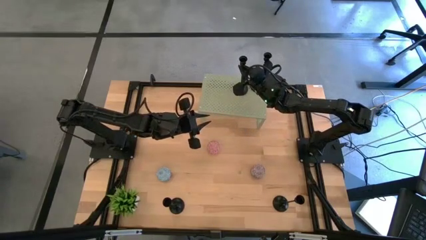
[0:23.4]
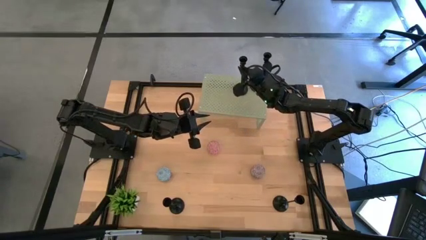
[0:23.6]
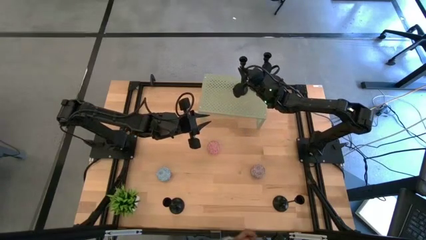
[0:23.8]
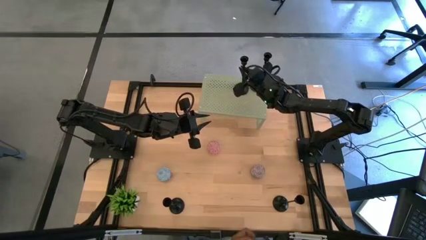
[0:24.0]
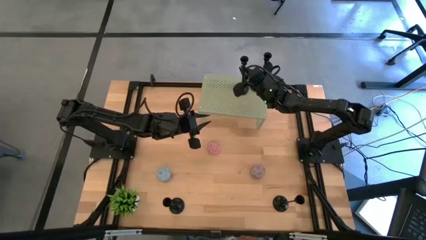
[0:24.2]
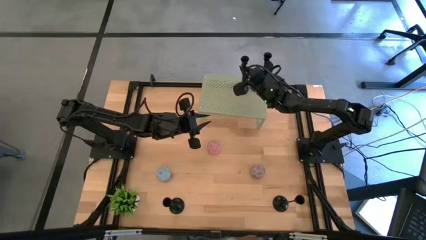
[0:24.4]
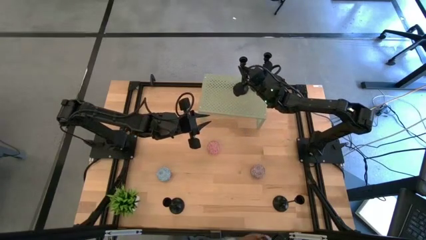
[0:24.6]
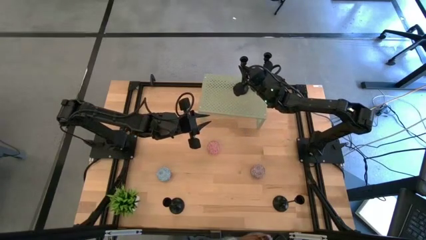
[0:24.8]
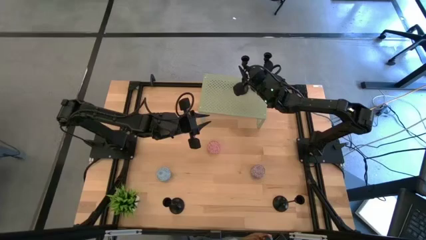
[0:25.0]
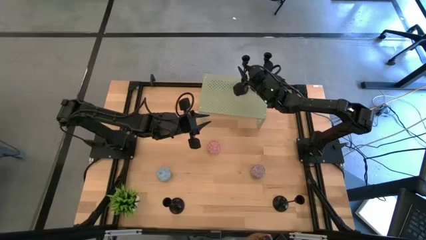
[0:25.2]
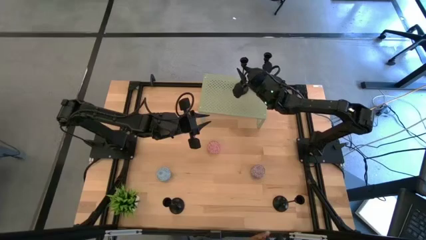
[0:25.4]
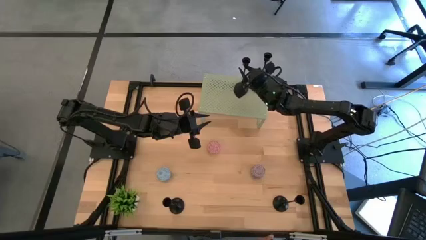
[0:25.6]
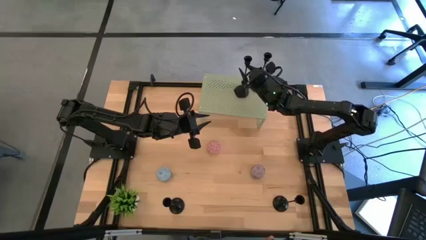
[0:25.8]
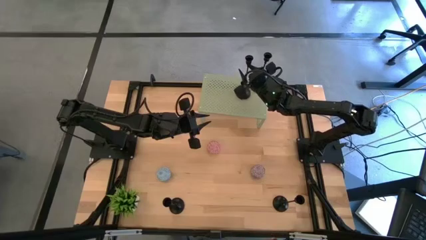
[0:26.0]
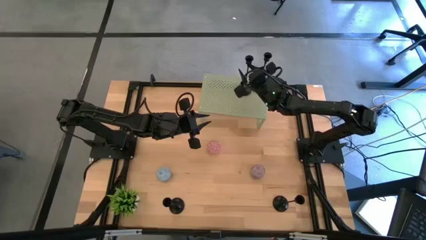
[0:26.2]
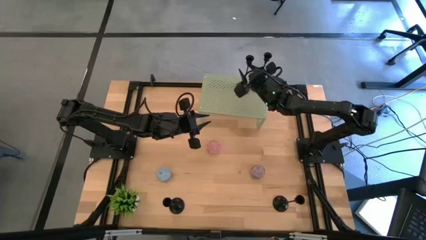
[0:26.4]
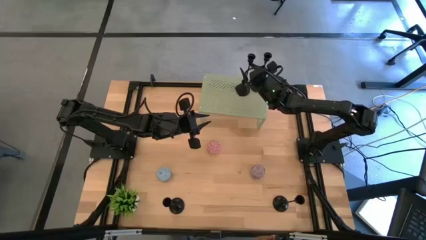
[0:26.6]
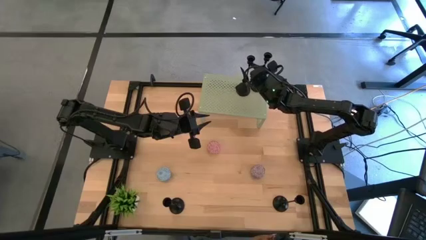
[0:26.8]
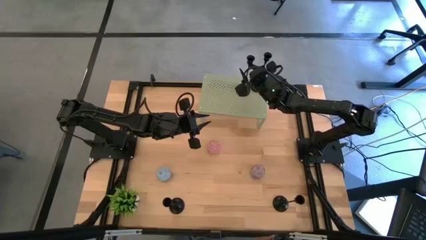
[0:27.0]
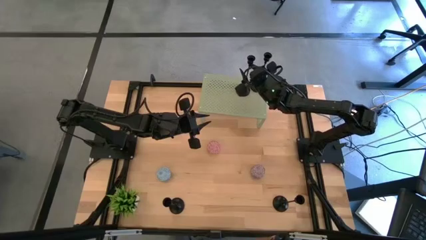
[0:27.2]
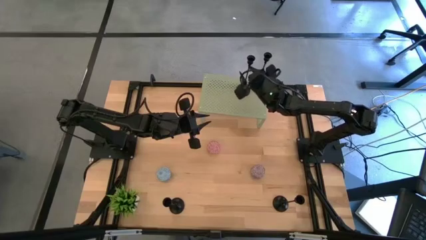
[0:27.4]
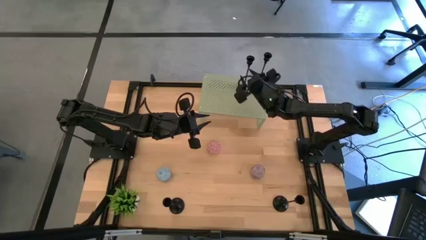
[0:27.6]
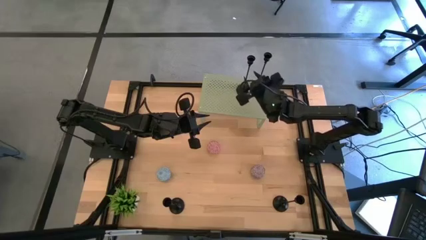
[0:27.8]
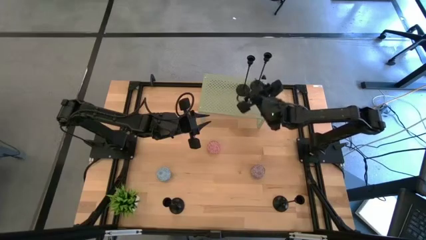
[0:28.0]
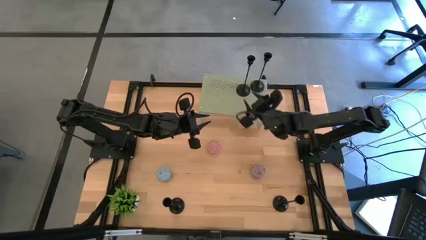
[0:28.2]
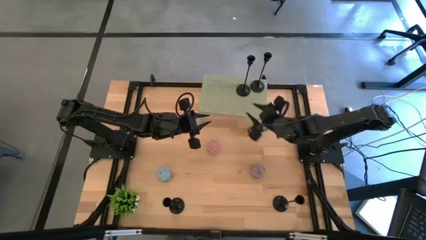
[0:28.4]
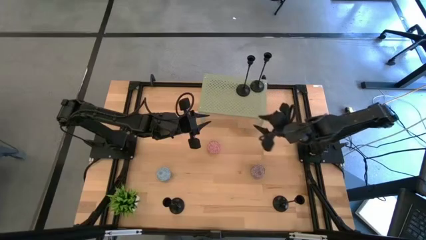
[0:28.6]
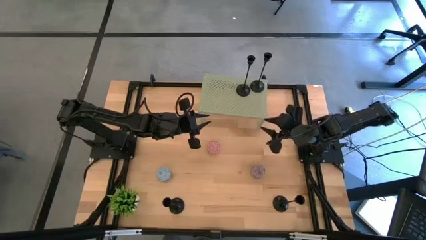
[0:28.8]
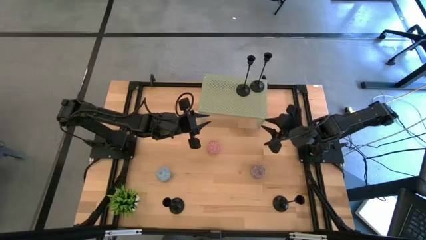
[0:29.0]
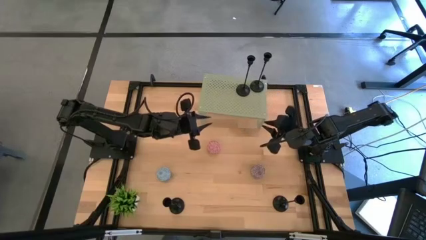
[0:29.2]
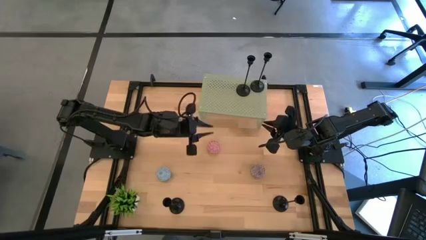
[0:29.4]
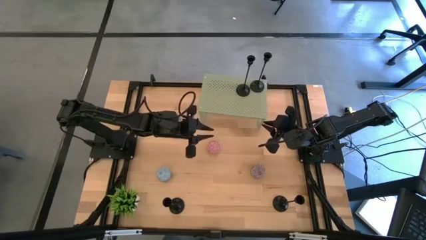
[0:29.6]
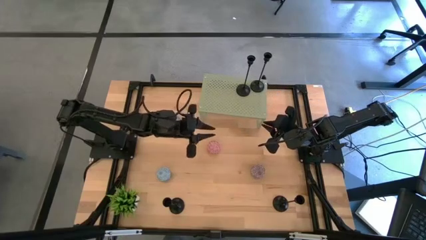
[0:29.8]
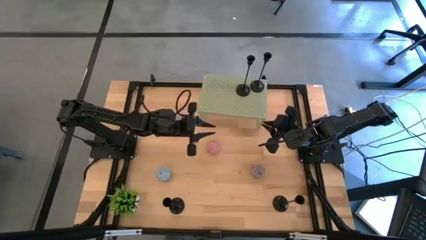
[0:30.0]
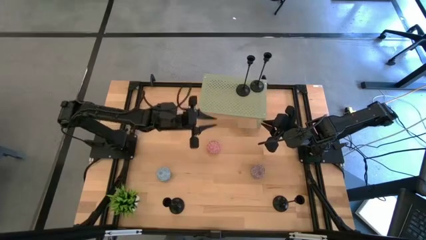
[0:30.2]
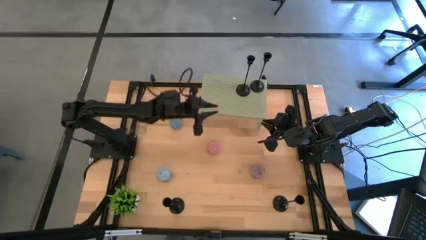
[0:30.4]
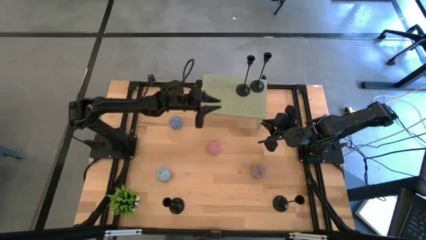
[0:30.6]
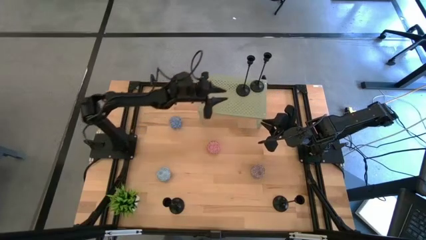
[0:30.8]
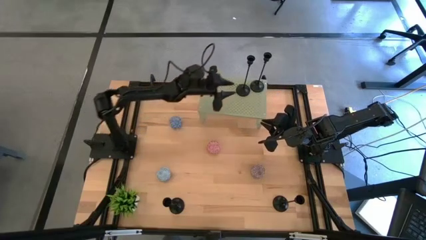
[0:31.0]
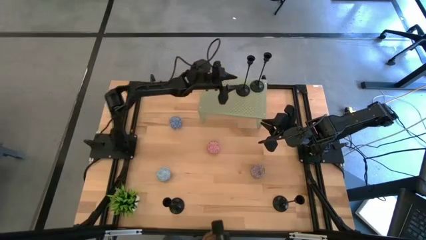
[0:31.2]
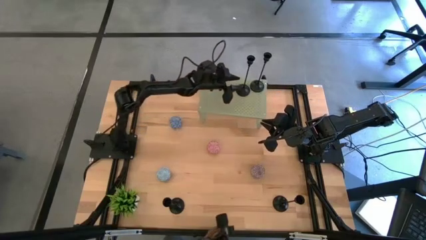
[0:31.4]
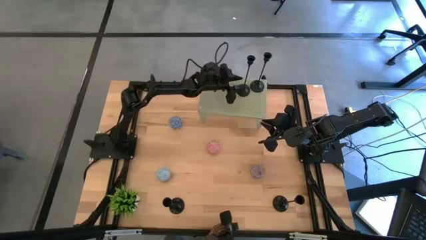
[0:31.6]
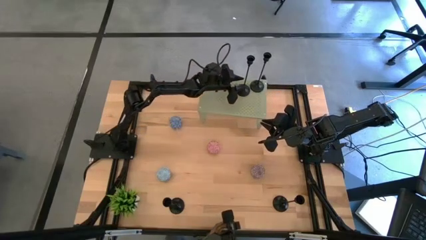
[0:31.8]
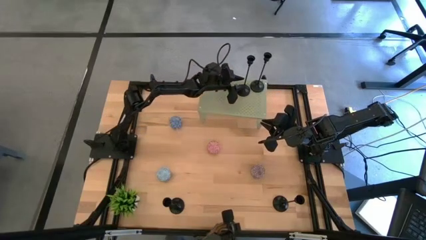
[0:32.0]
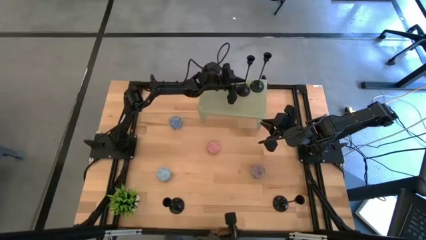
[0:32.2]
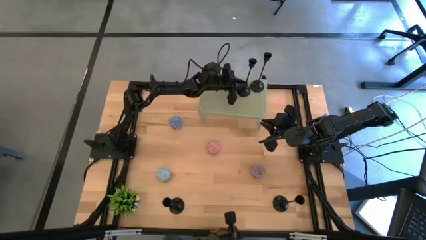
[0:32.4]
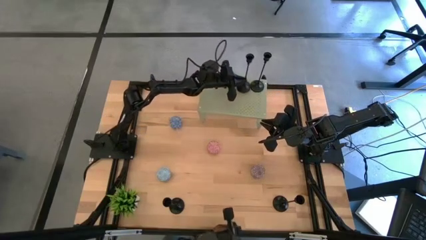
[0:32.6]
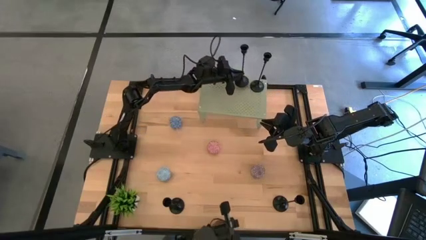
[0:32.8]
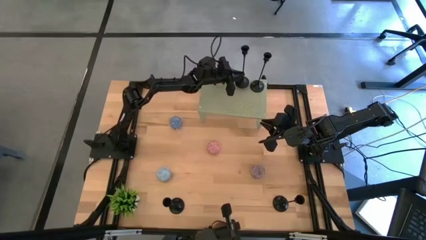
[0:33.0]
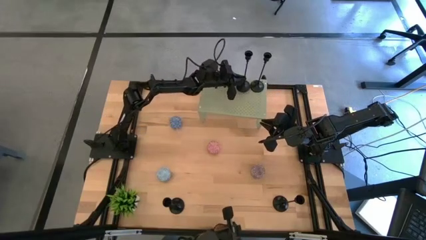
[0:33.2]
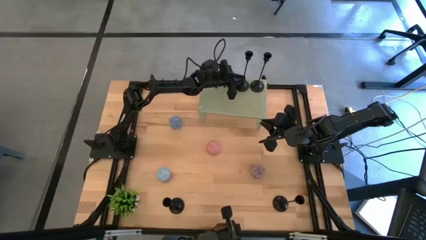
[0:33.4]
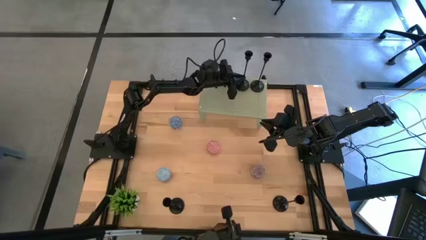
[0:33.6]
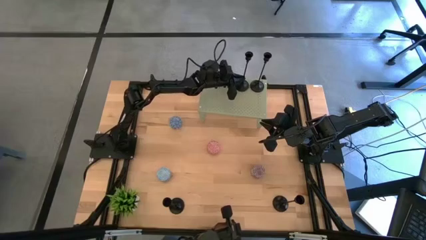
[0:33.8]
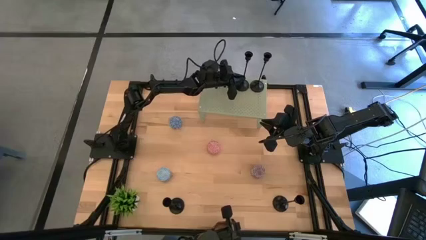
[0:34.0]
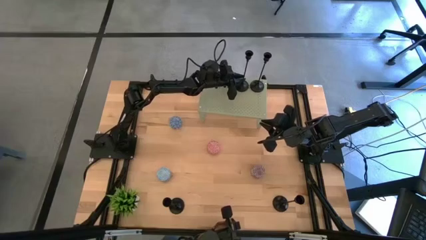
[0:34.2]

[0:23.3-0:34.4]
Task: Pick & Place candle stick holders
Put the middle black candle holder on the shelf

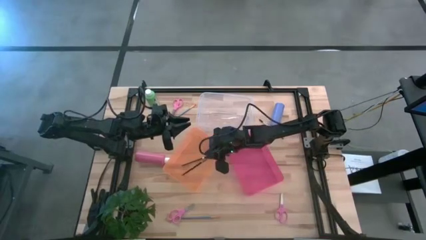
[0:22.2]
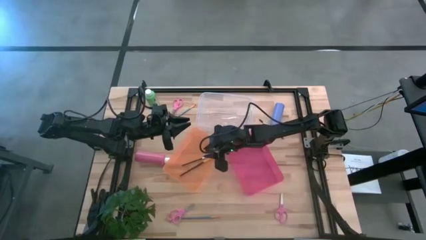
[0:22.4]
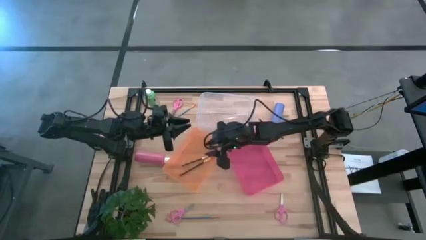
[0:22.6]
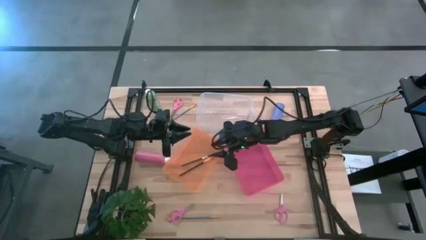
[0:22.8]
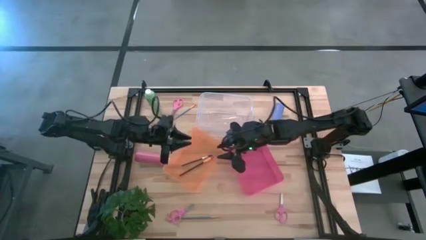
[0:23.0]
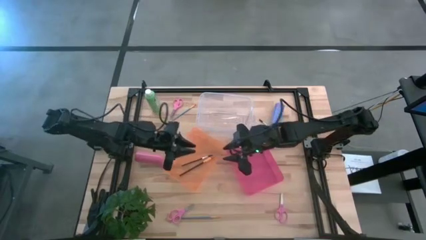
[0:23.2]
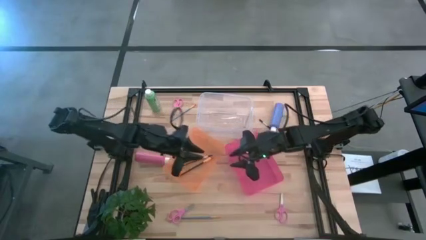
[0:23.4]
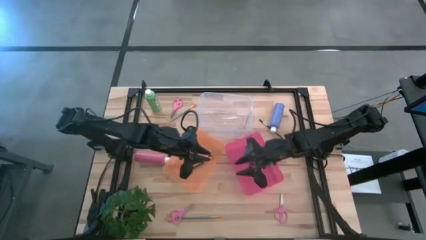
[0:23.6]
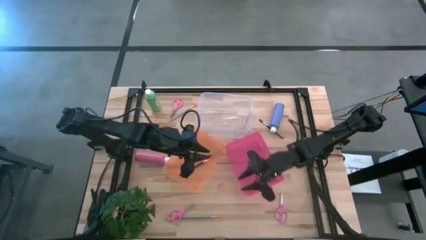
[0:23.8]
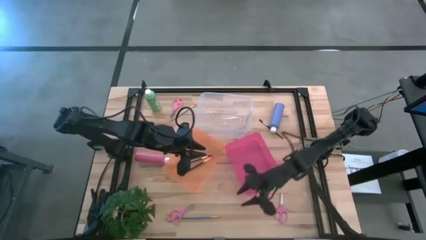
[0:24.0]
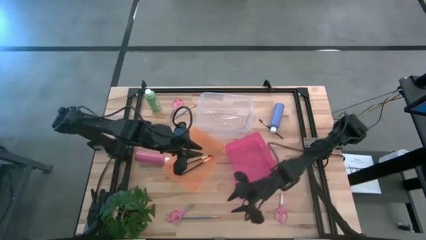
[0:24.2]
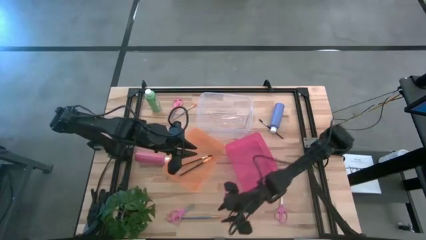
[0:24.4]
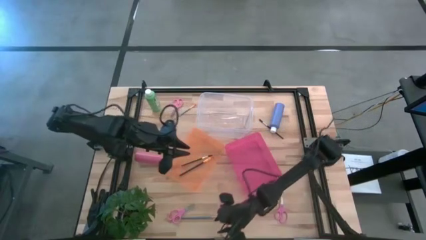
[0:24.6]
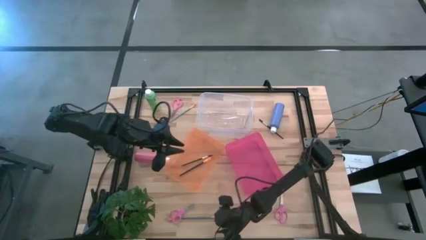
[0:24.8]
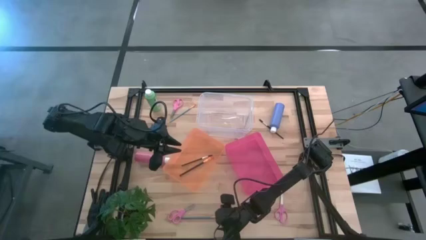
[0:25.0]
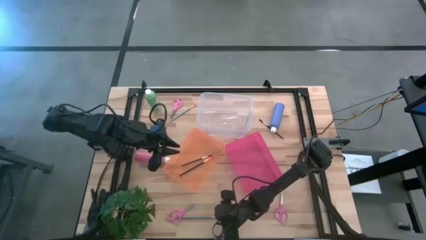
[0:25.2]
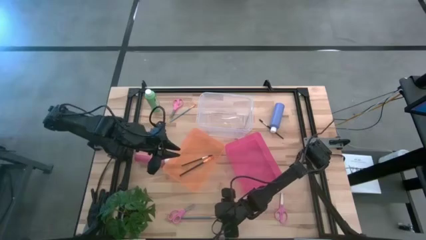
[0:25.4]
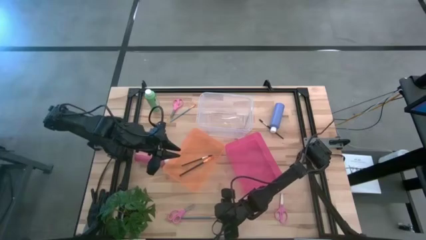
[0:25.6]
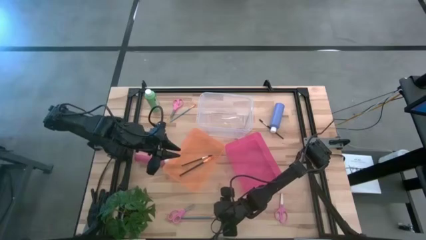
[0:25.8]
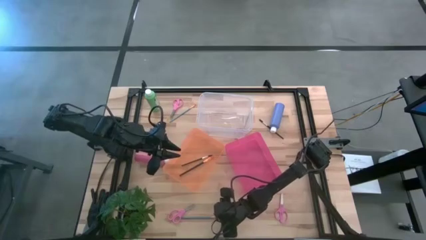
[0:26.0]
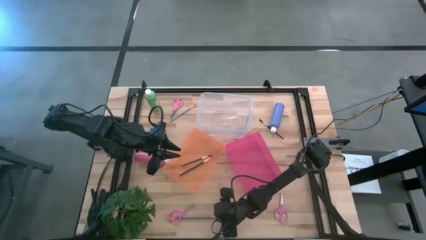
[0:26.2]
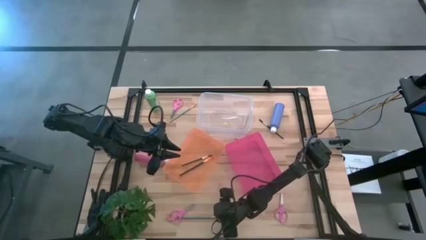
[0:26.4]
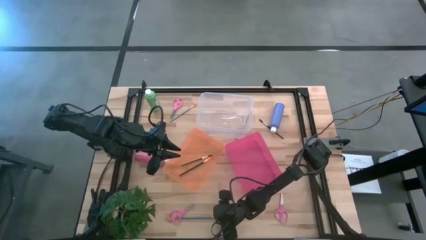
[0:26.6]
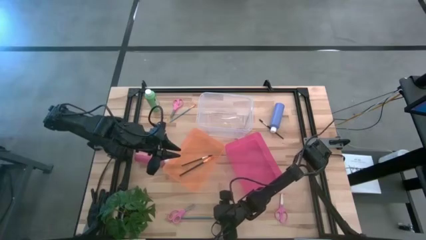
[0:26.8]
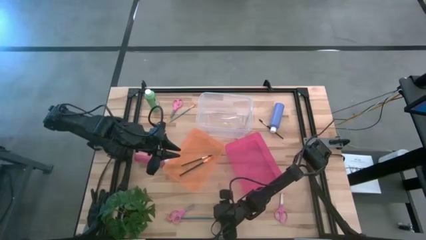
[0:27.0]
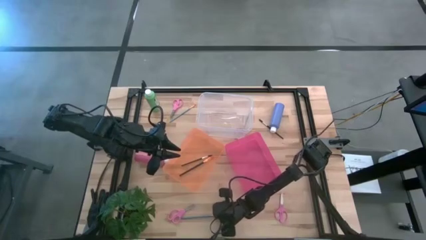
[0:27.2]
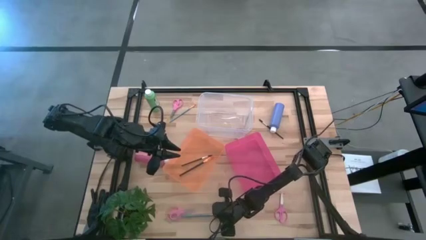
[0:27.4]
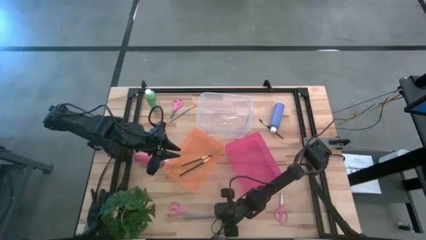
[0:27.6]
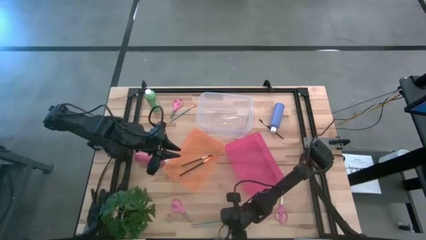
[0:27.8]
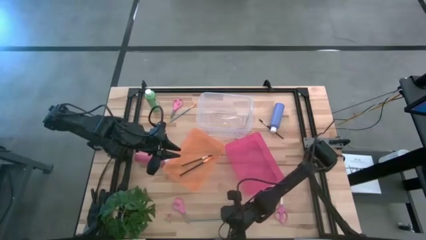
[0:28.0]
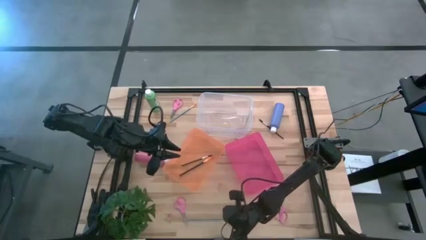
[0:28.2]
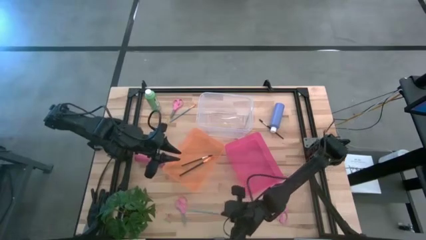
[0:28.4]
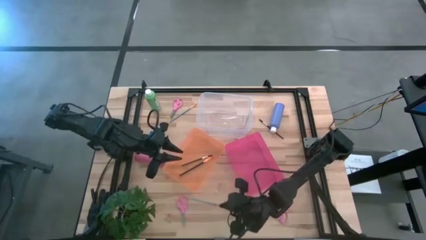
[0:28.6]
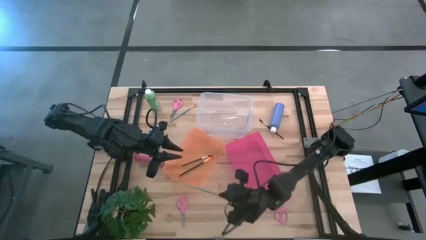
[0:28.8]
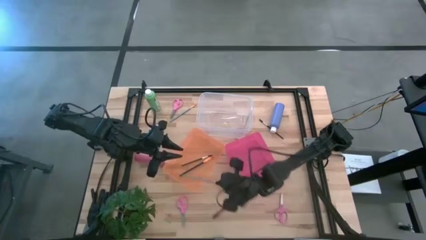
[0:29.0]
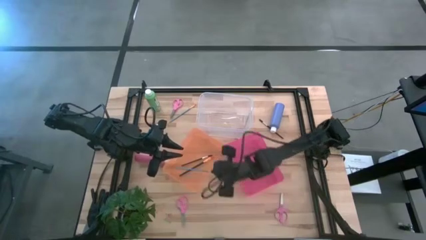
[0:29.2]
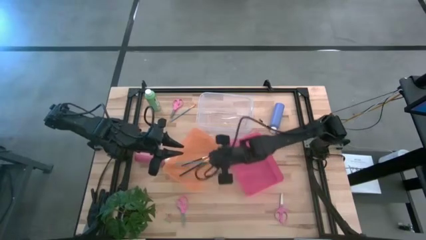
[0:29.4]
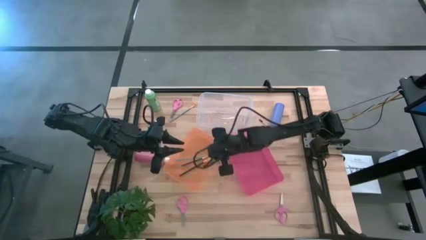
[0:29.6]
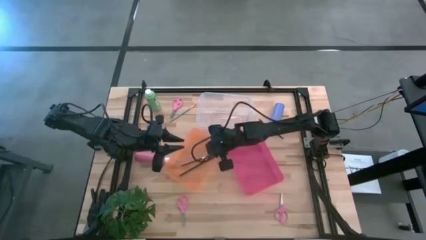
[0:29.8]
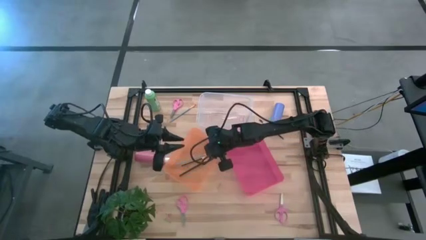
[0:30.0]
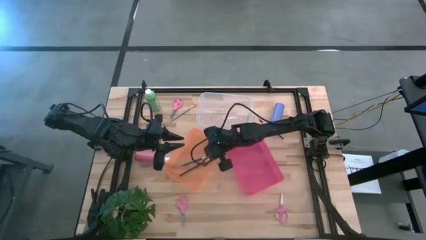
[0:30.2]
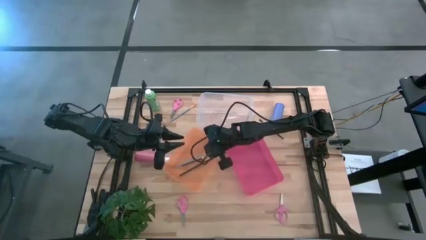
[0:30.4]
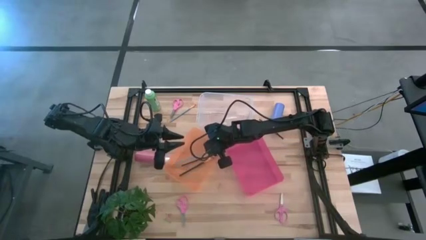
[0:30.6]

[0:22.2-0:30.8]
Task: Pick & Place Paint Supplies
Put the bottom blue paint brush into the orange bin
